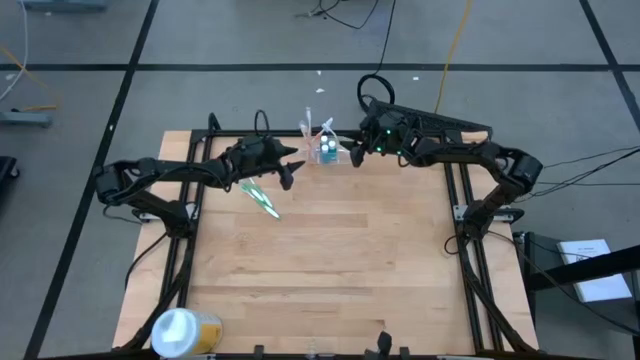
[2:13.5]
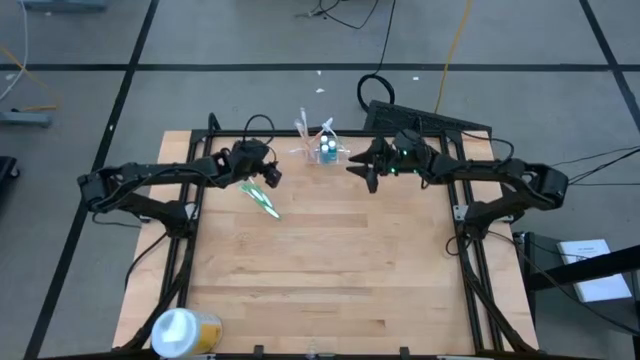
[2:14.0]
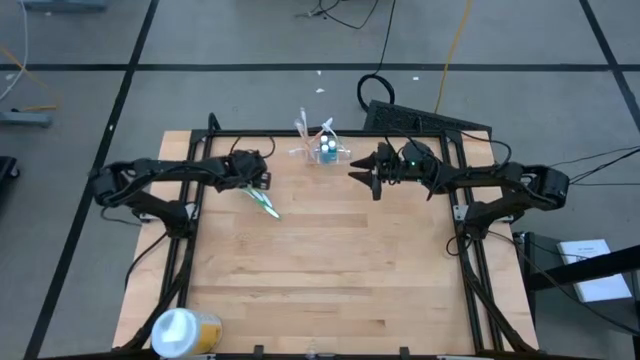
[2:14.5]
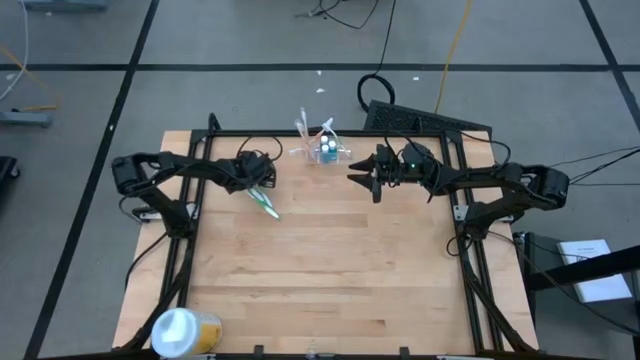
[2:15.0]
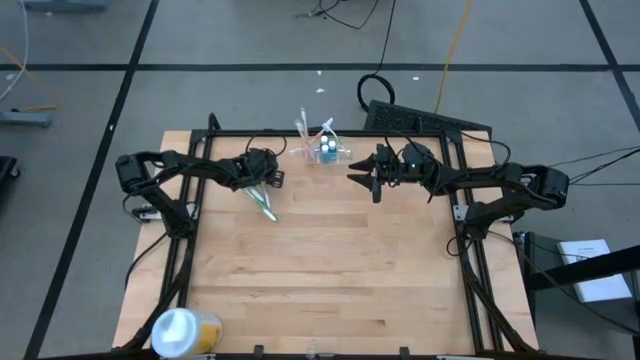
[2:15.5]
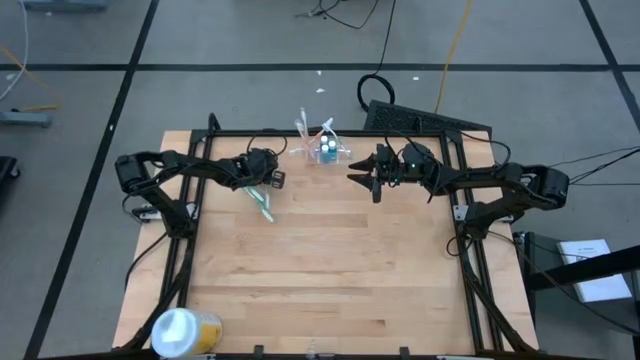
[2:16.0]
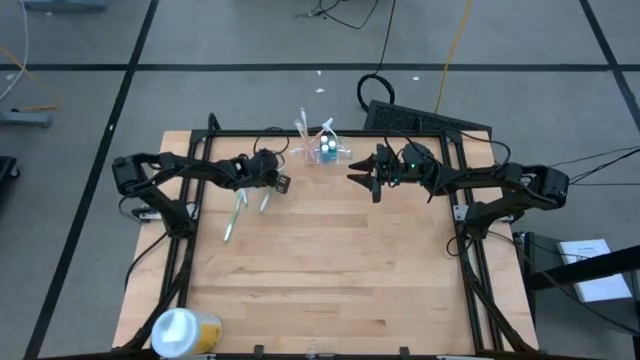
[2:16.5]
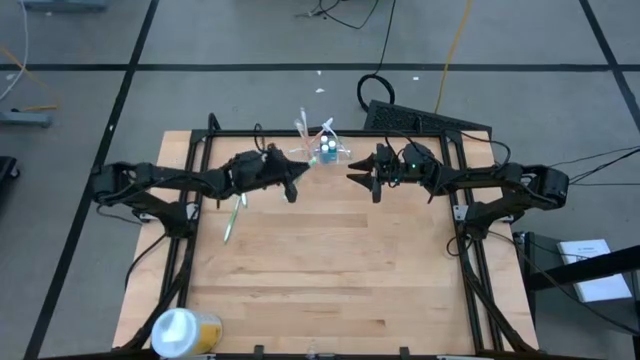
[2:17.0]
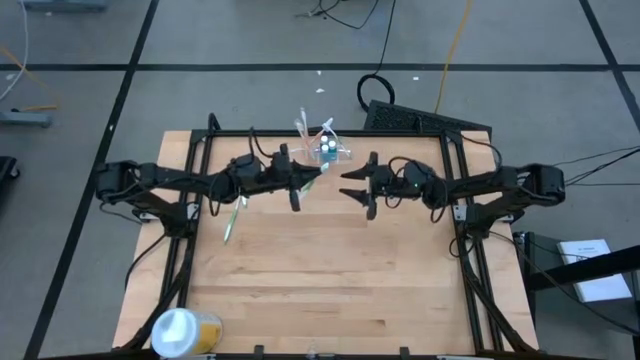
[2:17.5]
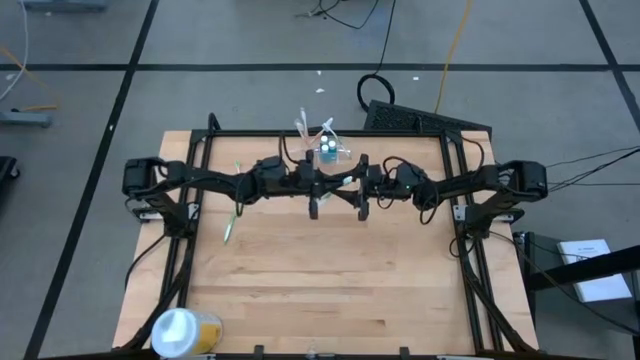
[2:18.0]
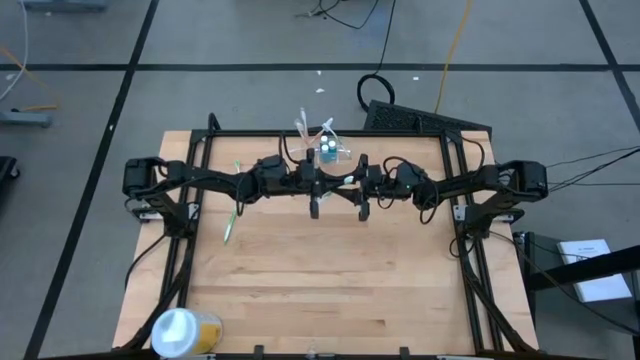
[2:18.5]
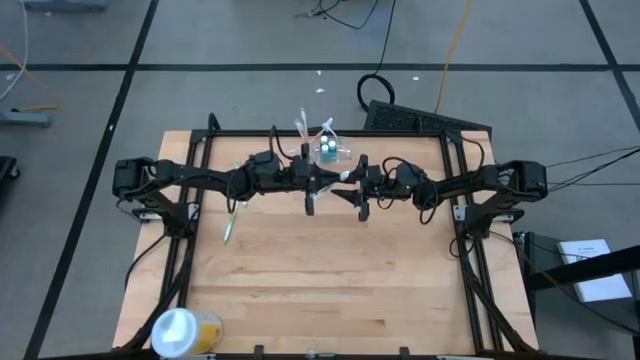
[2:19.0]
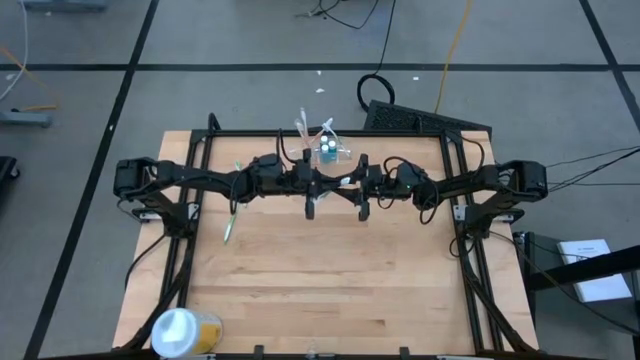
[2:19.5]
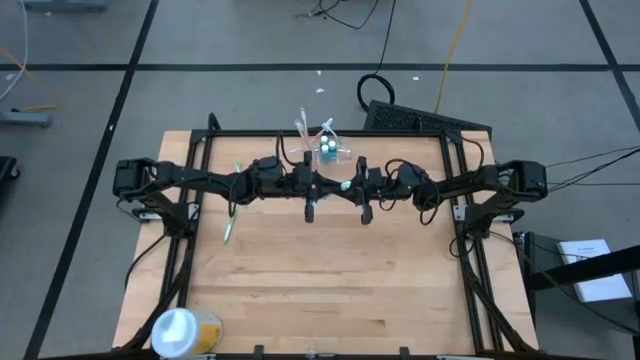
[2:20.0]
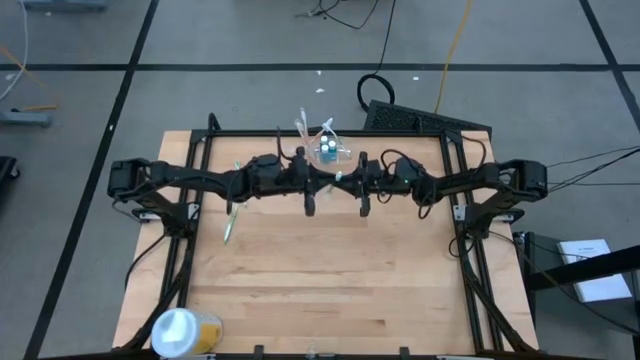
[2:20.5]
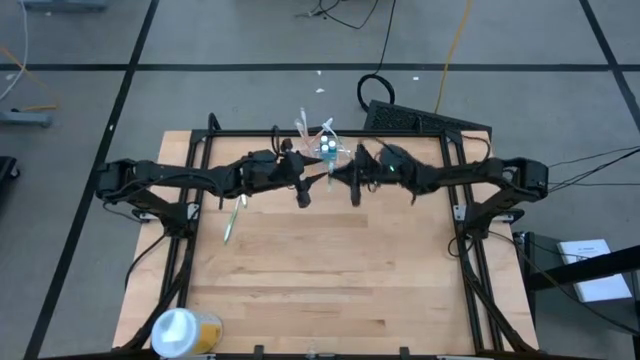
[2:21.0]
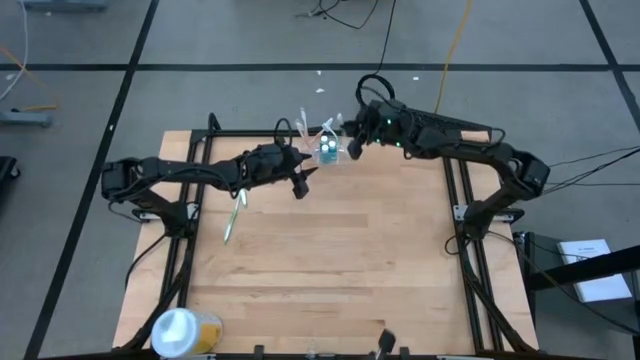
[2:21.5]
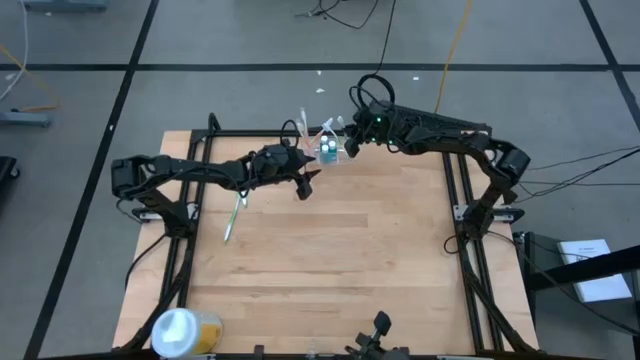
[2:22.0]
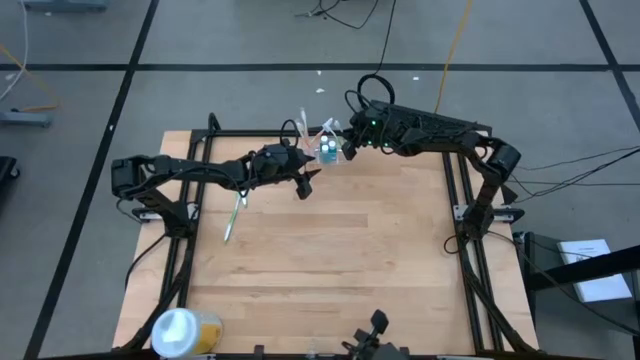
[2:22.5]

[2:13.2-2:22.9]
Task: Pick & Place toothbrushing station
Put the green toothbrush into the transparent organizer

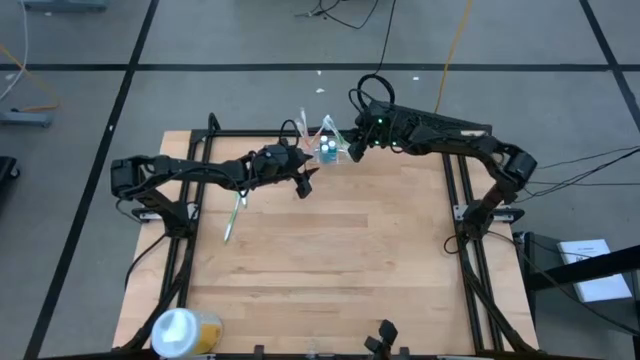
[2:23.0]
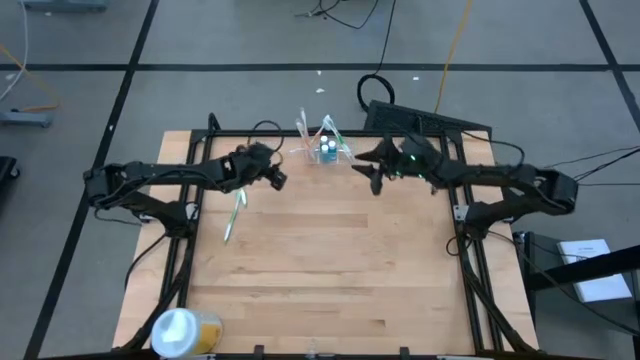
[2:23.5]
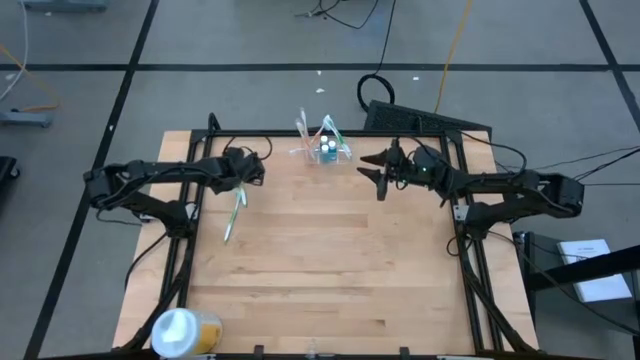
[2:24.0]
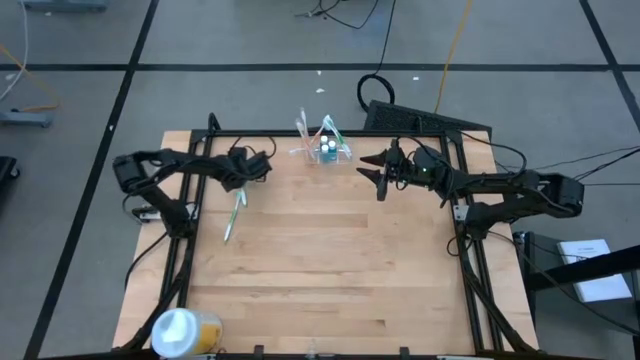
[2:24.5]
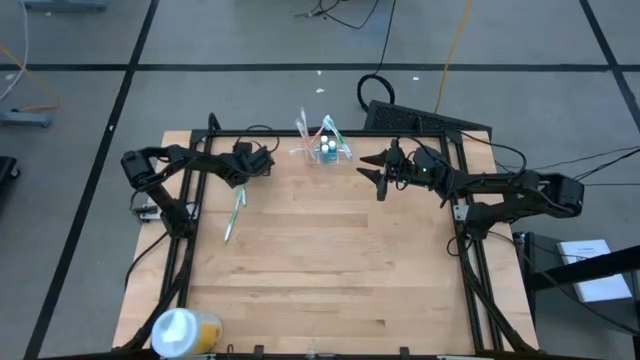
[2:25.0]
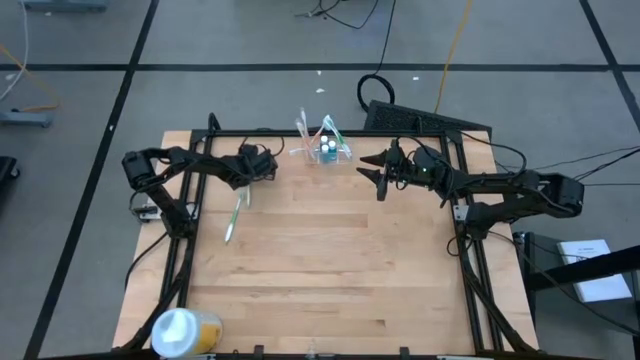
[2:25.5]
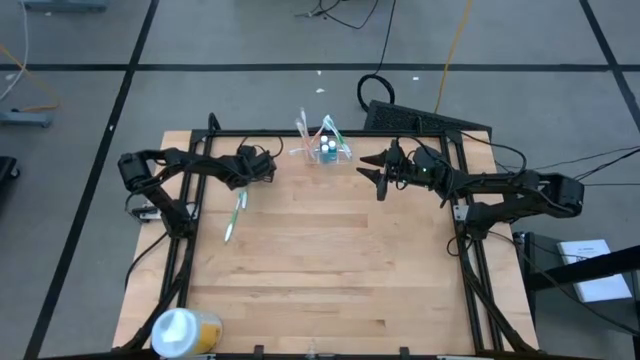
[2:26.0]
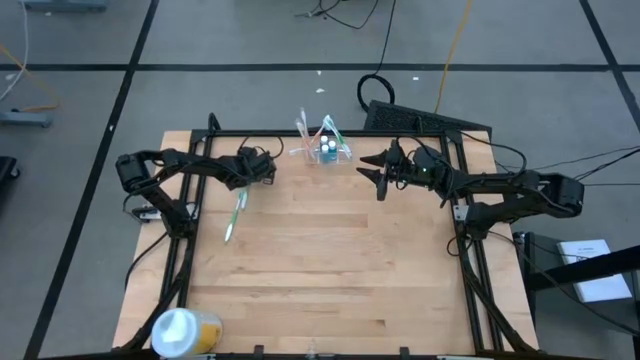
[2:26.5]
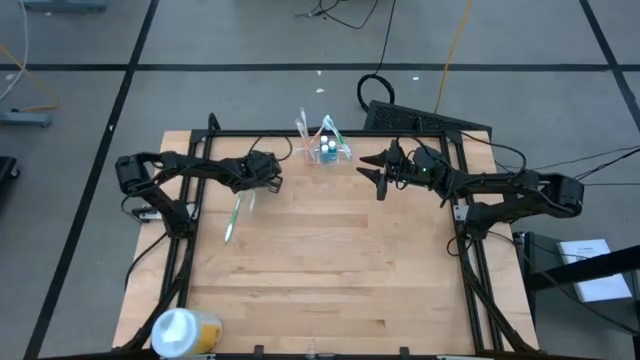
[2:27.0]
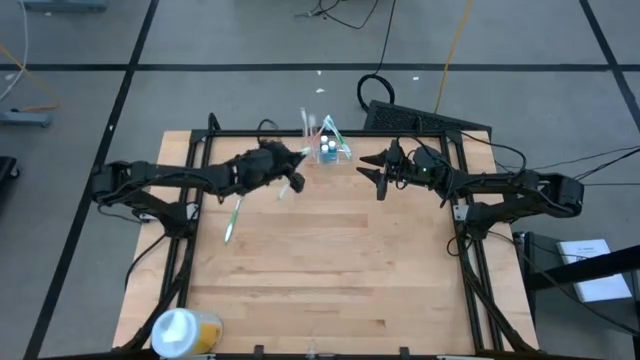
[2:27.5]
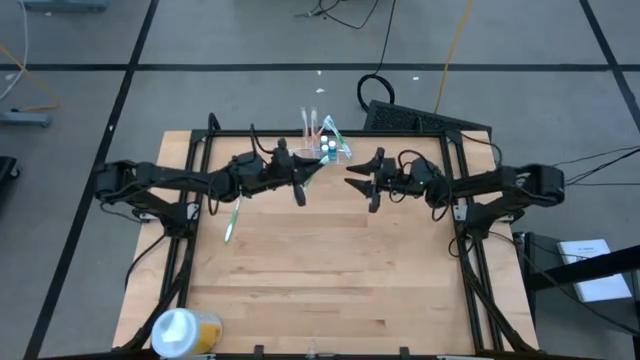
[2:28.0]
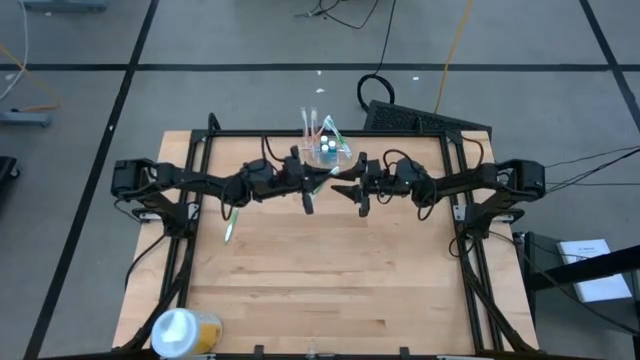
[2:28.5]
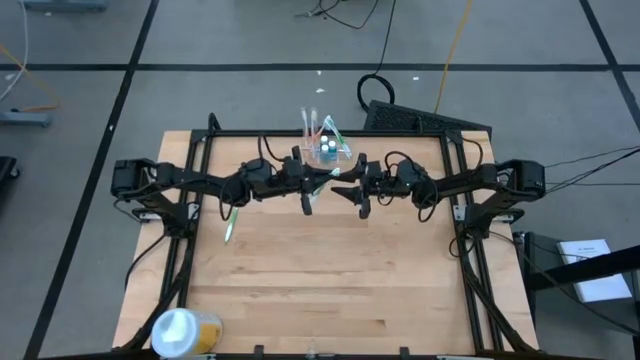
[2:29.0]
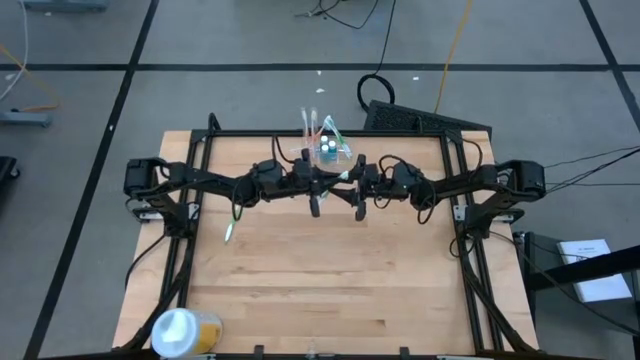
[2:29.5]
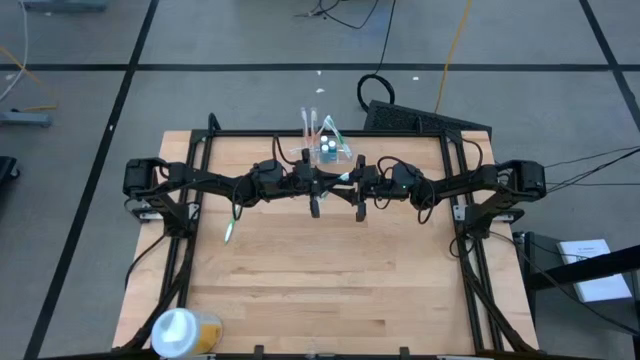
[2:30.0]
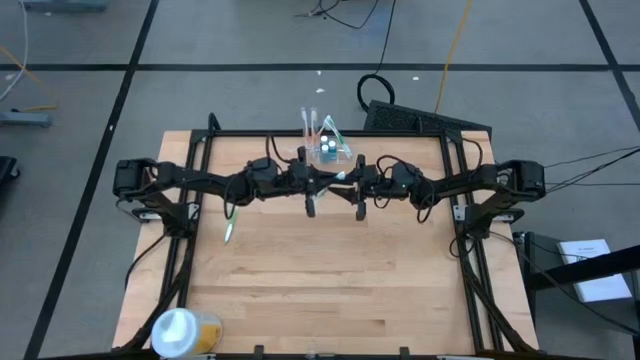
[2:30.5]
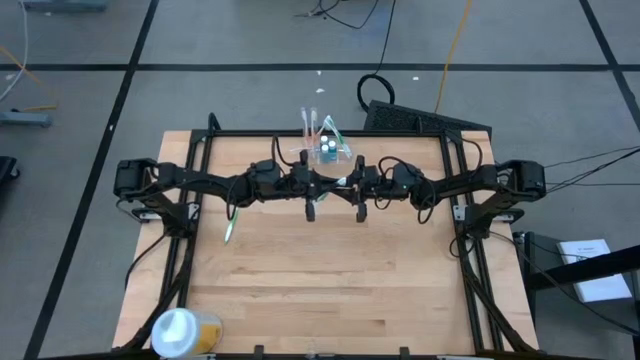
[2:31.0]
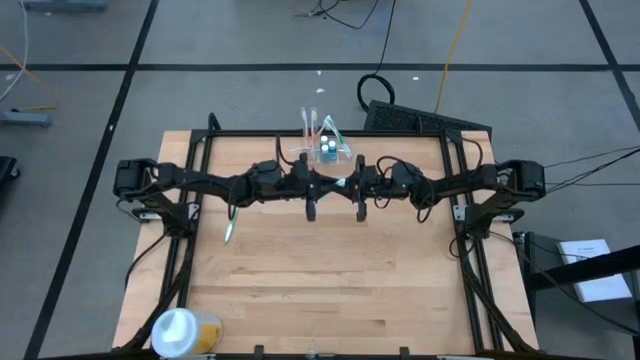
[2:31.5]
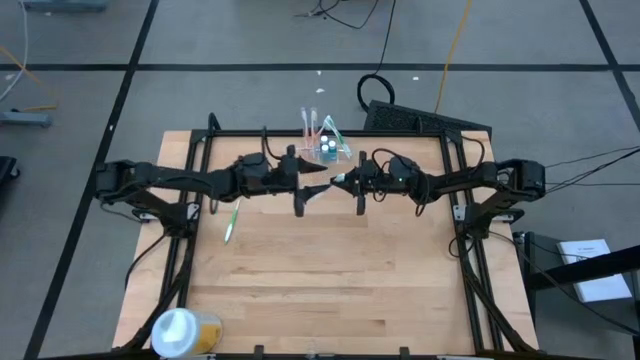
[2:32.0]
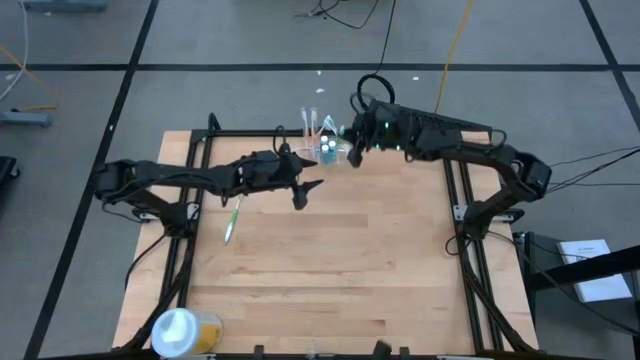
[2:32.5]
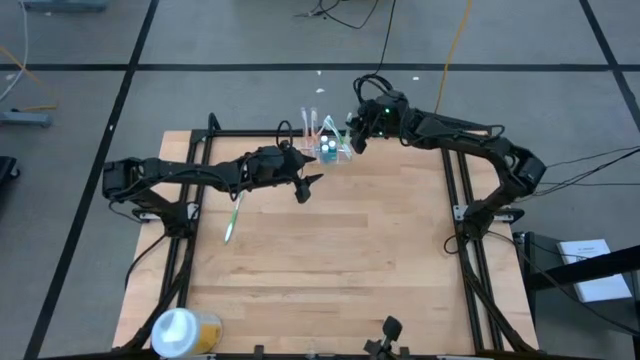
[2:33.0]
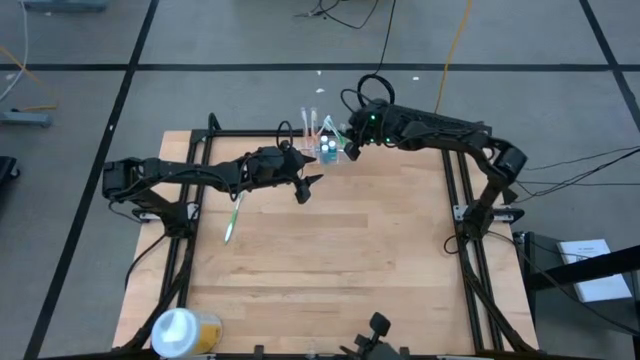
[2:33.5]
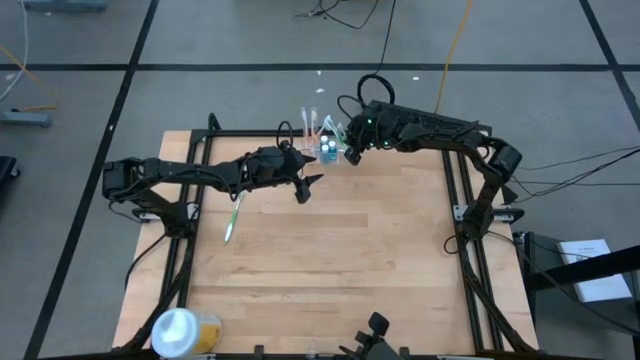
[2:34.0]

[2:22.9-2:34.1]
Put the green toothbrush into the transparent organizer
